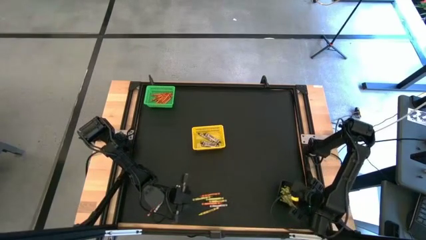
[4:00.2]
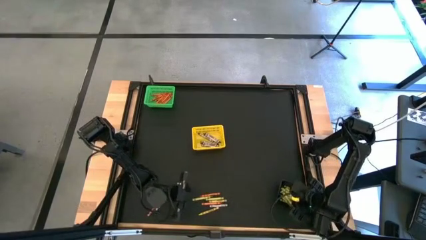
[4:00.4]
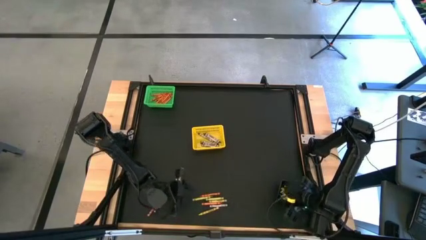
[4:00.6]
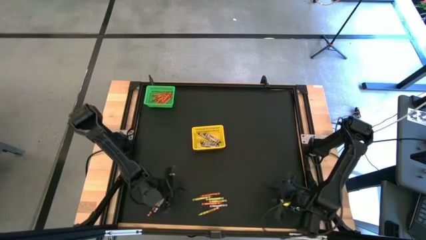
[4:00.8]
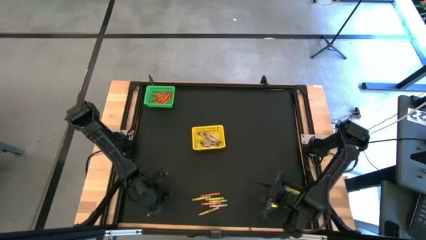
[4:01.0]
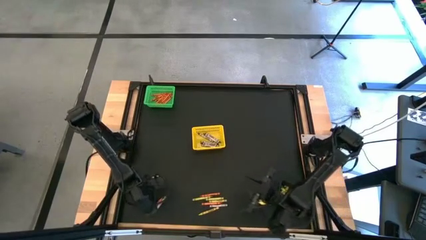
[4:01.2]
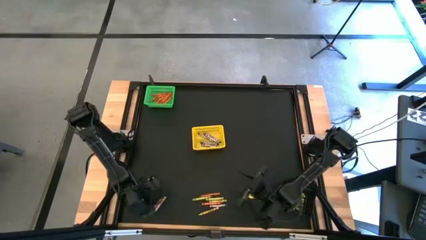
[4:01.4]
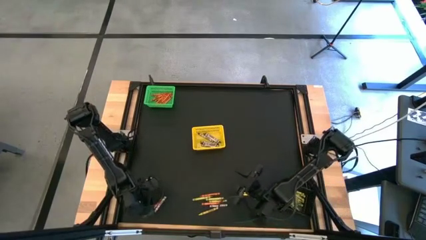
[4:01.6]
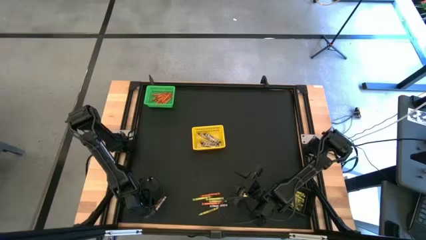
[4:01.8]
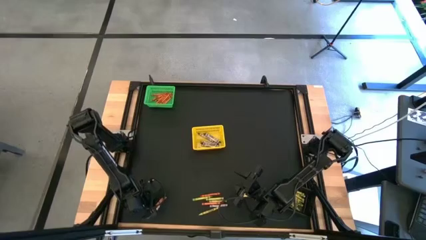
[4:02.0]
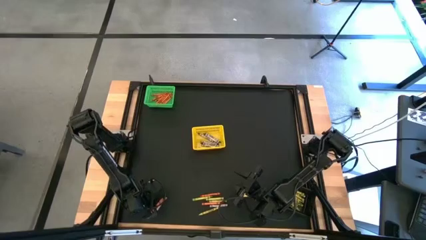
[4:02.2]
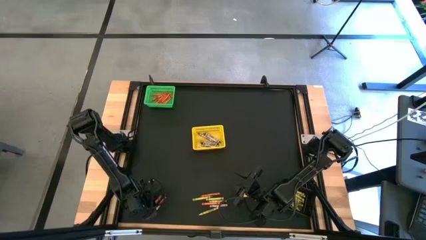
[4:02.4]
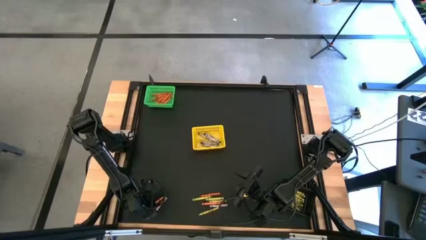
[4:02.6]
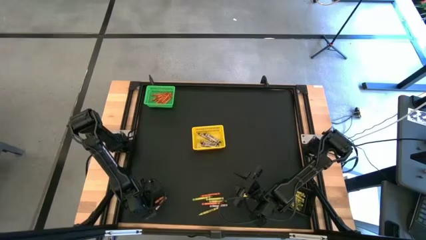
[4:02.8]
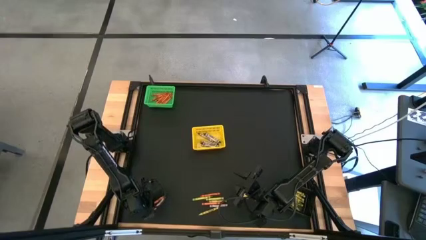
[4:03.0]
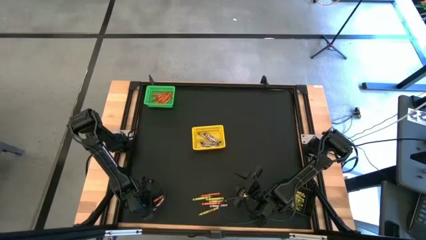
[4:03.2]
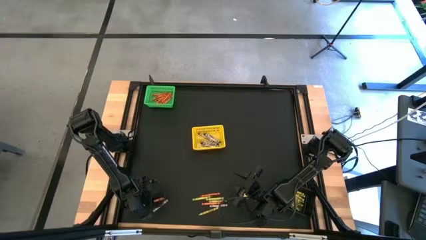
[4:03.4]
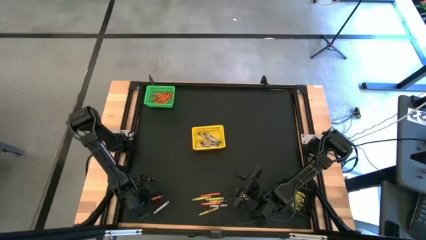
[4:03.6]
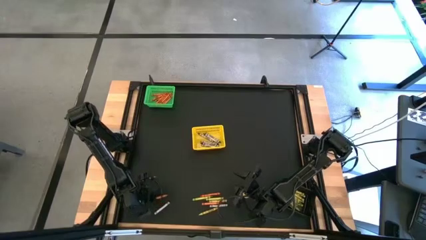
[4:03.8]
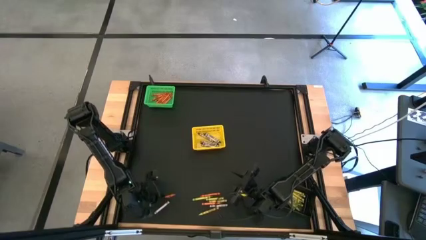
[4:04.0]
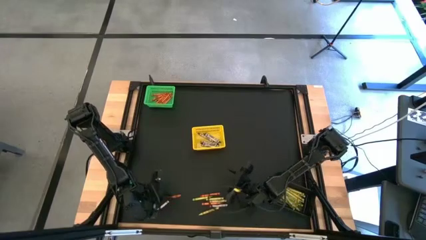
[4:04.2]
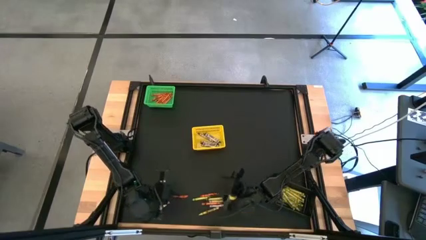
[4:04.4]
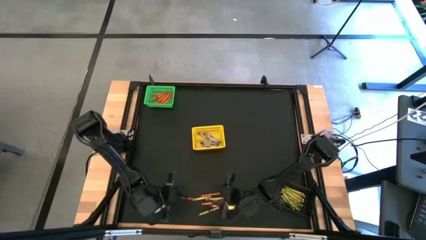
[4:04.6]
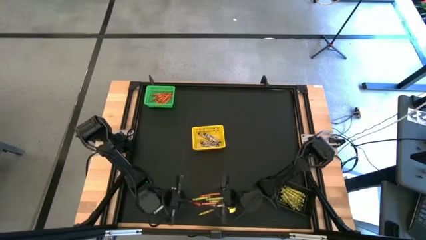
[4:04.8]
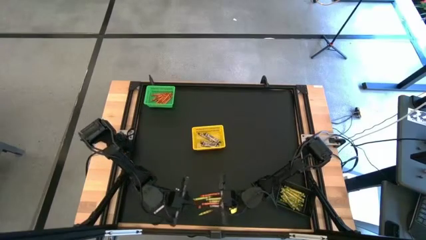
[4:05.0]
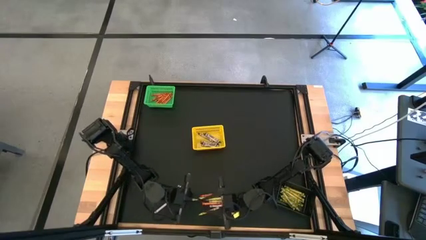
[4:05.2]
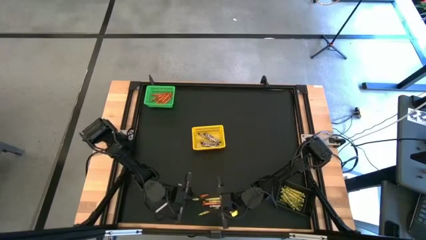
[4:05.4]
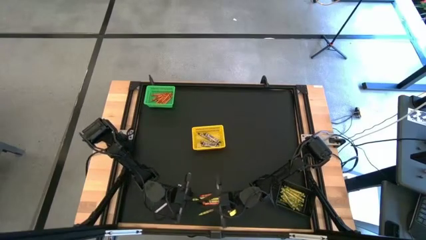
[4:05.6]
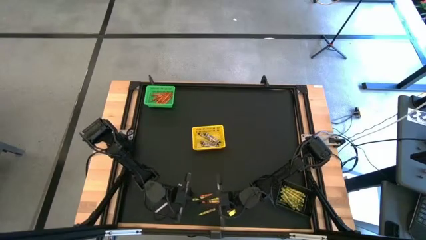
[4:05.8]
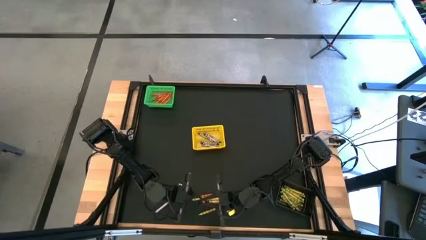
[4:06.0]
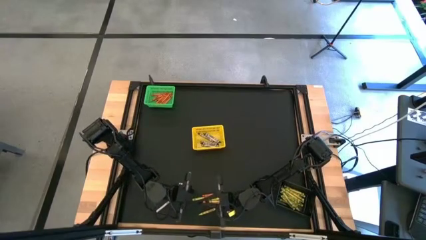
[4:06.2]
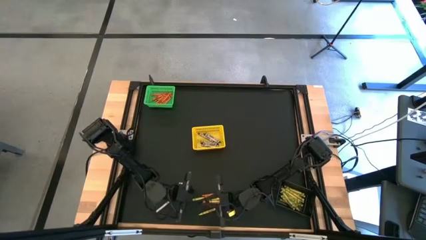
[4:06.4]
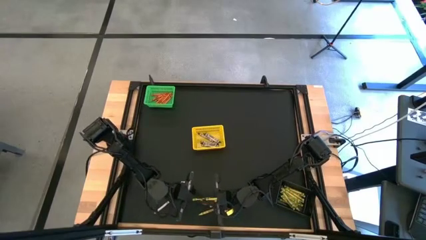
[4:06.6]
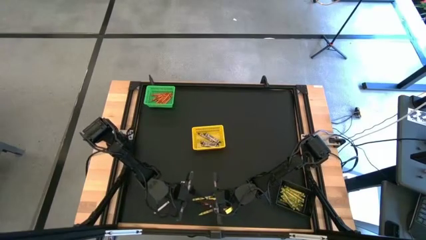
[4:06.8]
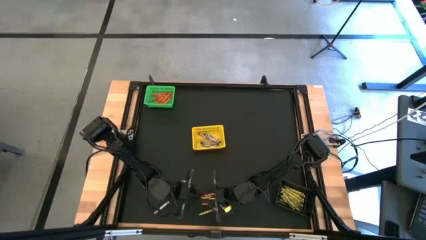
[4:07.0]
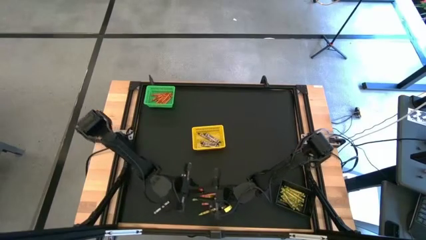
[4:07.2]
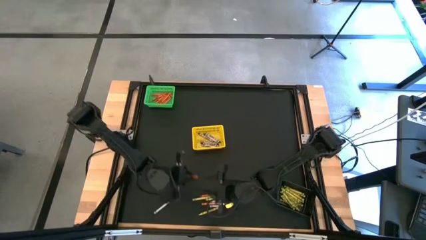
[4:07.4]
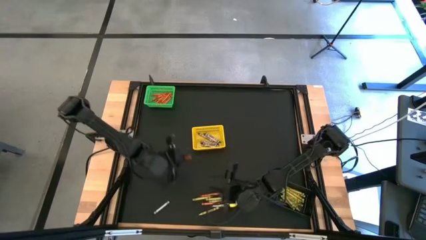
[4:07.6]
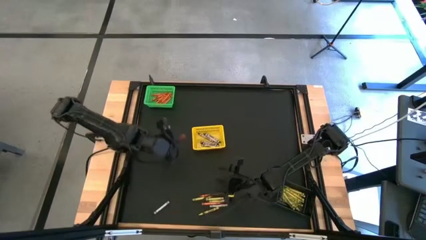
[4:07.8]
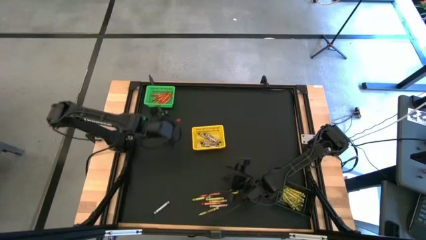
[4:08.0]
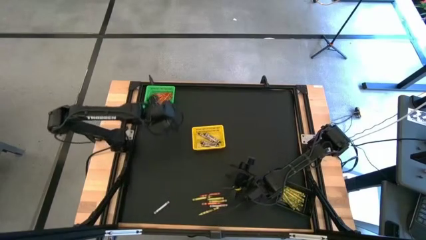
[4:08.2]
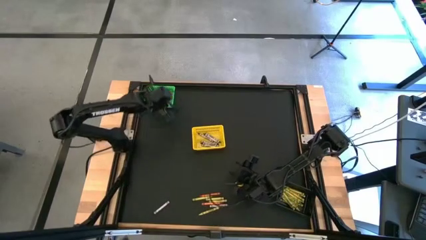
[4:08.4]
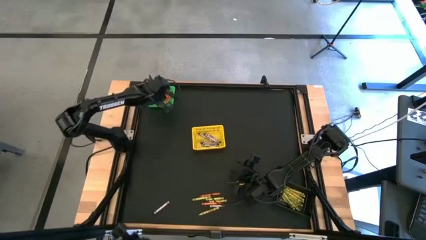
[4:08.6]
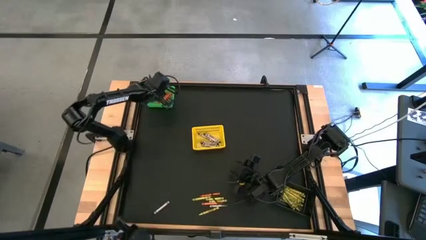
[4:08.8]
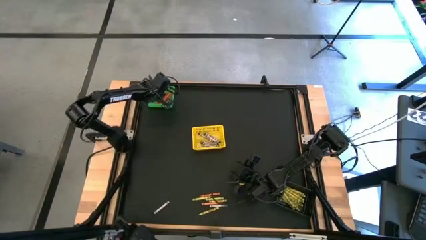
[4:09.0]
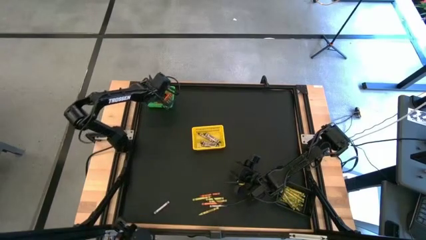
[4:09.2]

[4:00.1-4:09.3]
Task: Sort crayons
Put the orange crayon into the green bin

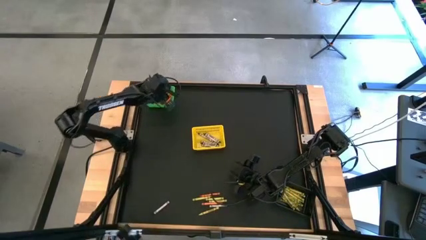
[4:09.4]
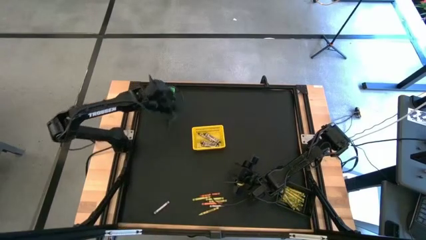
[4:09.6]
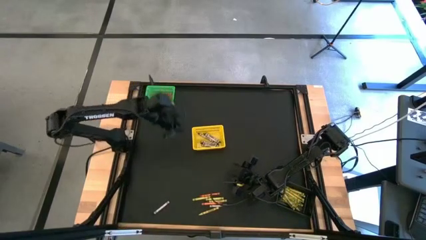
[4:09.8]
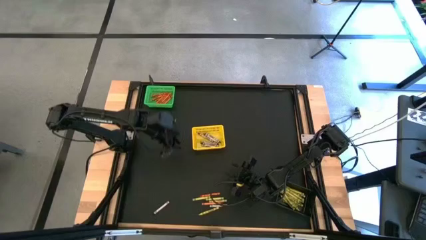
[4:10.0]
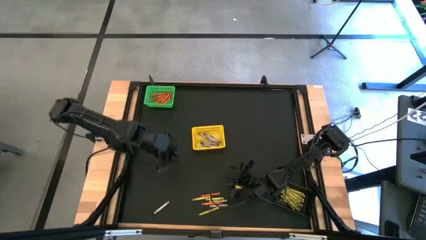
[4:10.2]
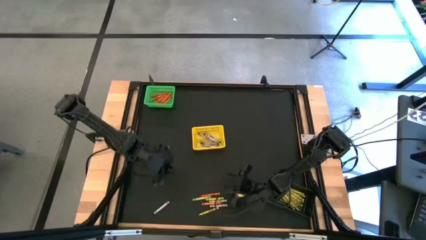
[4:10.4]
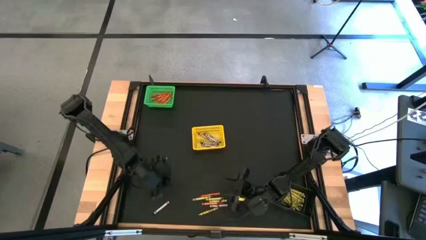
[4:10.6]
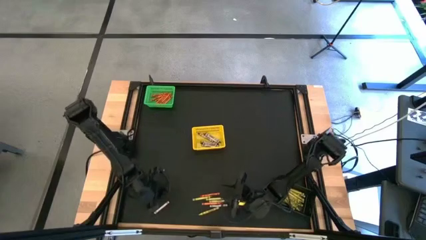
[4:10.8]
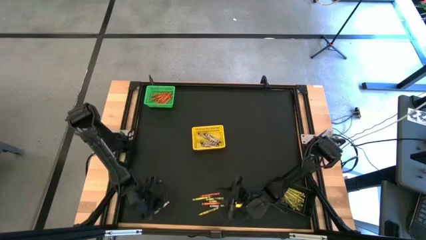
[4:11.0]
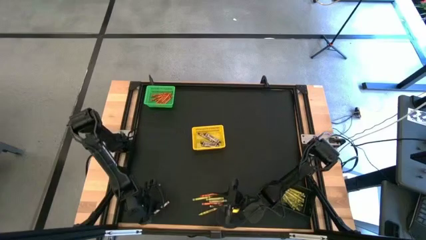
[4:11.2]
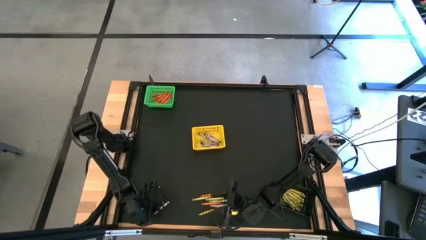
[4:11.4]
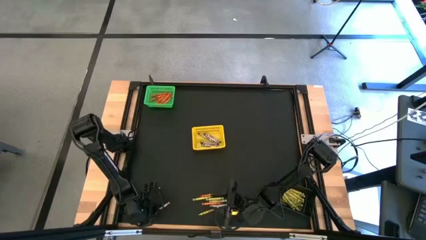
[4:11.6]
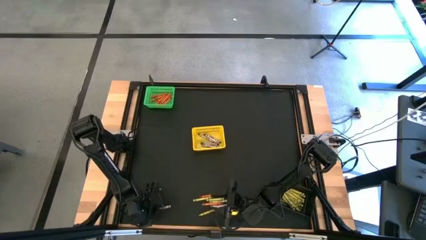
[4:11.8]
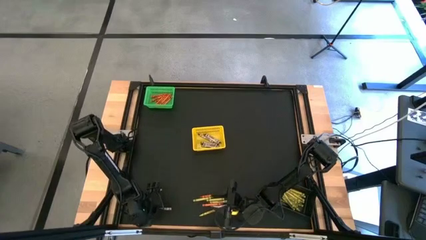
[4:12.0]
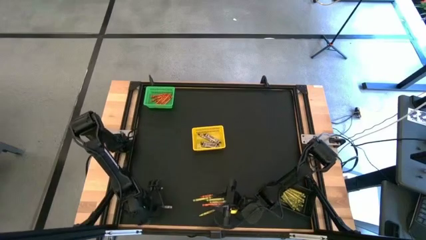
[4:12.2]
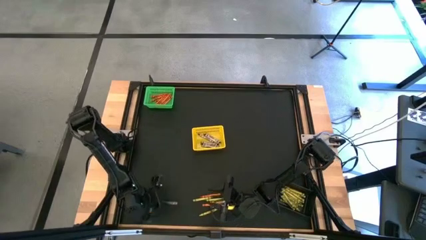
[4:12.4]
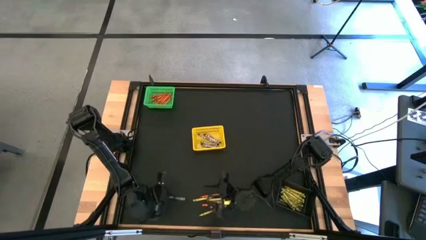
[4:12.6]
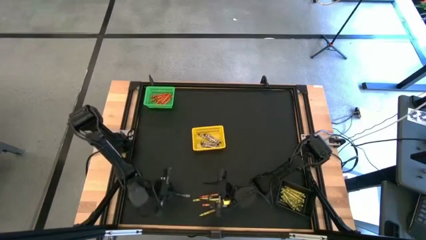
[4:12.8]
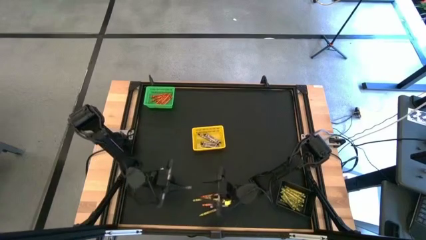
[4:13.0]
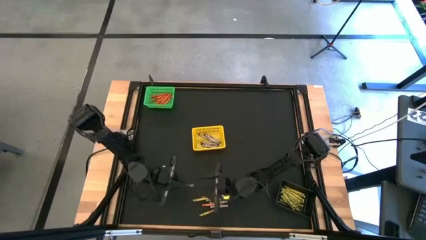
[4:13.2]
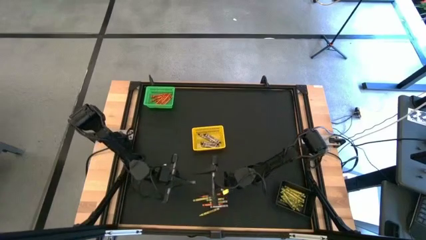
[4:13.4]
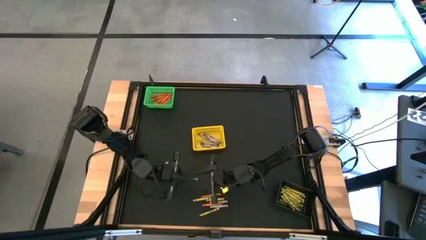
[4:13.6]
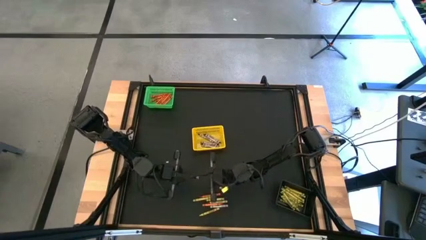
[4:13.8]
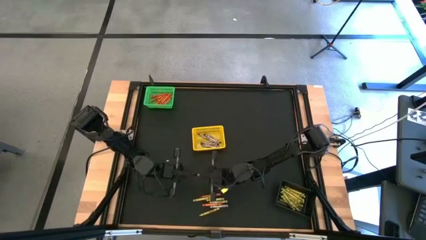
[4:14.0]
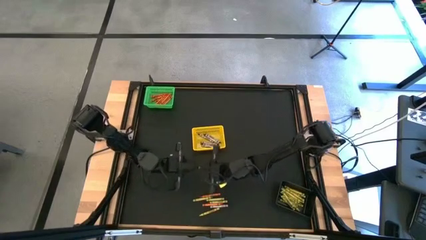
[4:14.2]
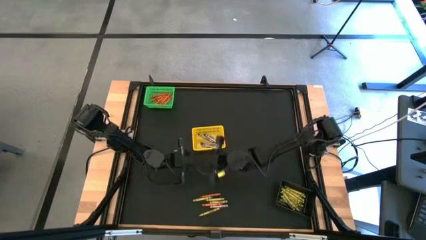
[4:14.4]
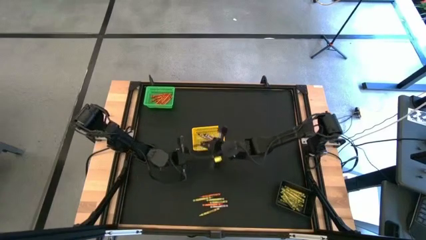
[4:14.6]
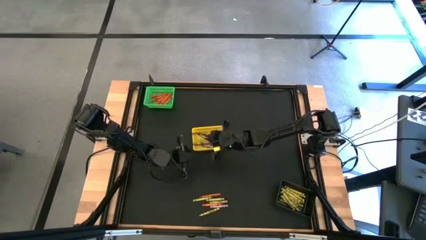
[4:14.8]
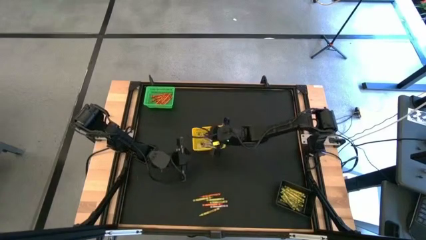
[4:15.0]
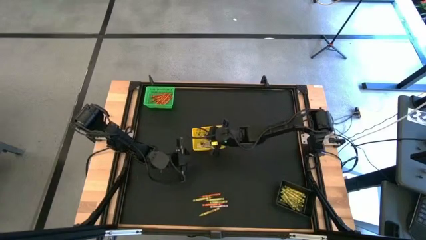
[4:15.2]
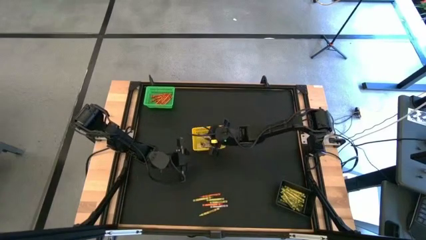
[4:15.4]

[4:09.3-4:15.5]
Put the black crayon into the yellow bin
